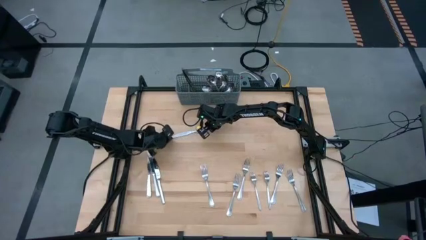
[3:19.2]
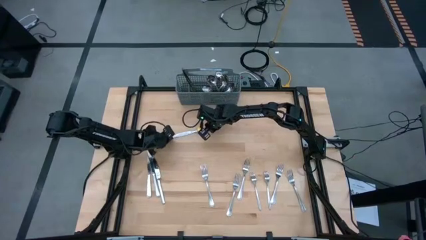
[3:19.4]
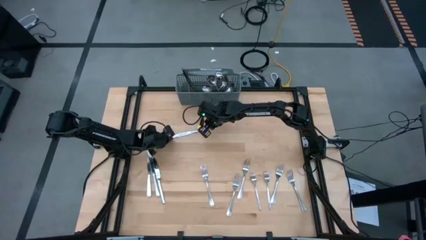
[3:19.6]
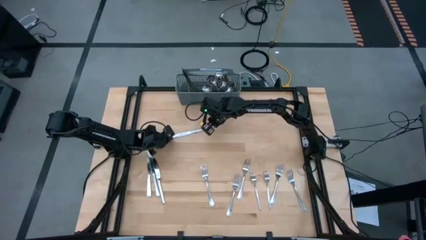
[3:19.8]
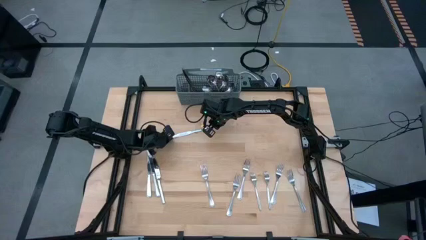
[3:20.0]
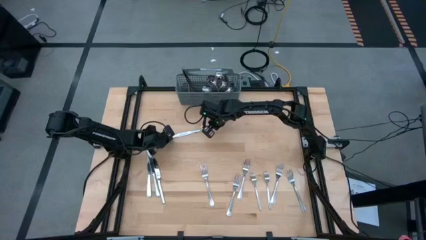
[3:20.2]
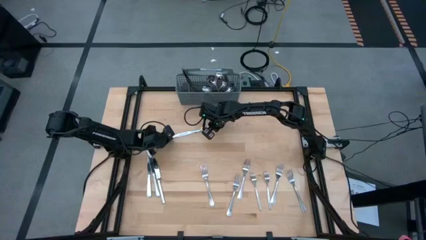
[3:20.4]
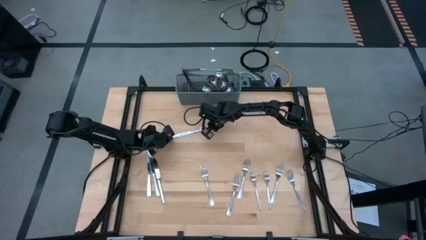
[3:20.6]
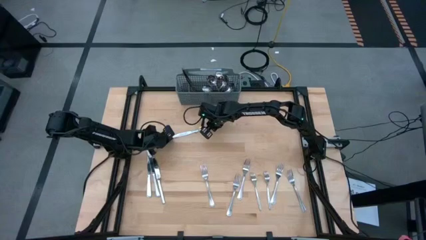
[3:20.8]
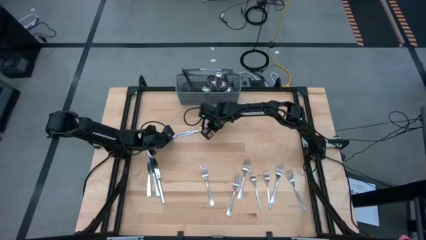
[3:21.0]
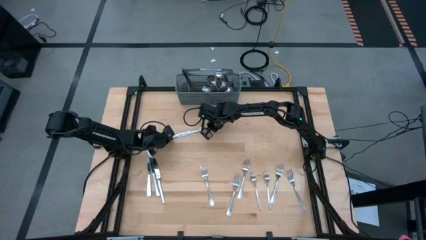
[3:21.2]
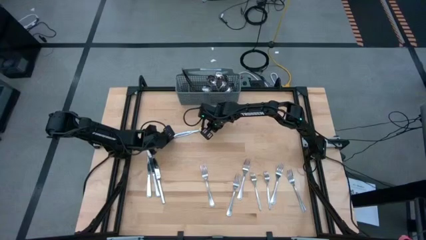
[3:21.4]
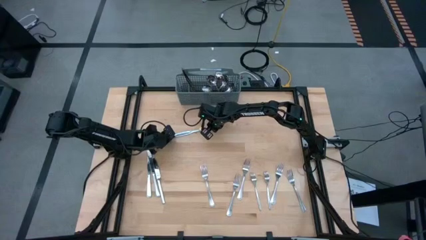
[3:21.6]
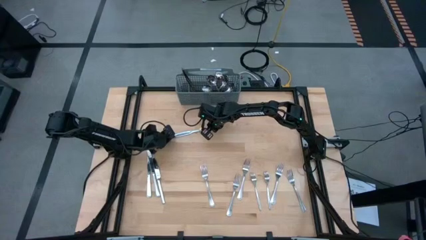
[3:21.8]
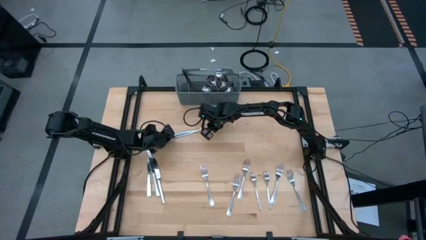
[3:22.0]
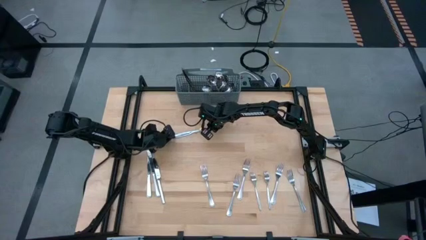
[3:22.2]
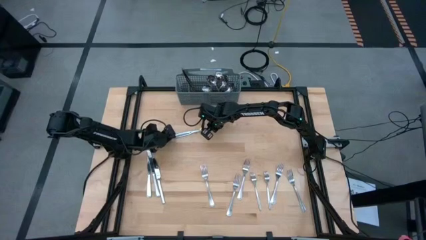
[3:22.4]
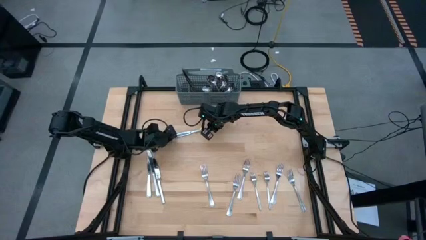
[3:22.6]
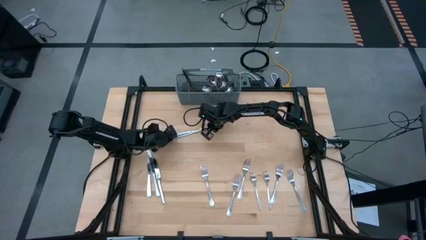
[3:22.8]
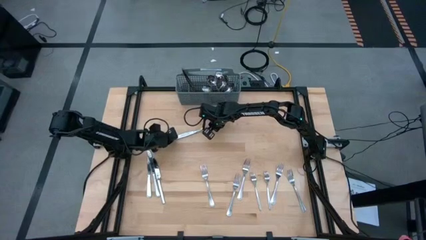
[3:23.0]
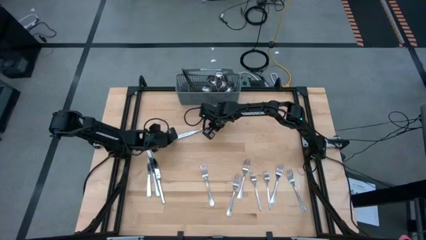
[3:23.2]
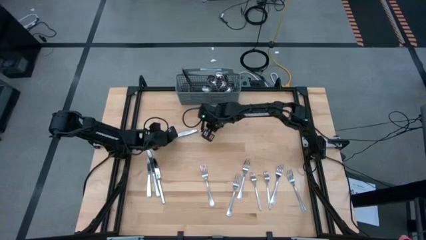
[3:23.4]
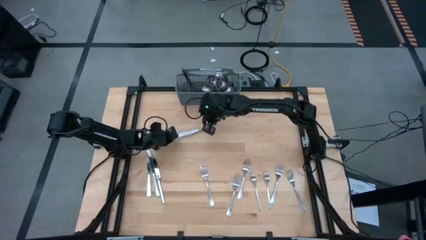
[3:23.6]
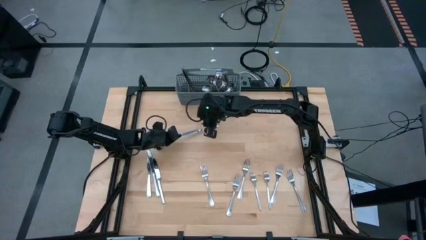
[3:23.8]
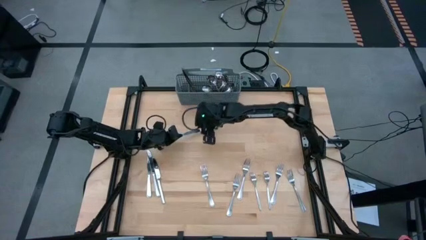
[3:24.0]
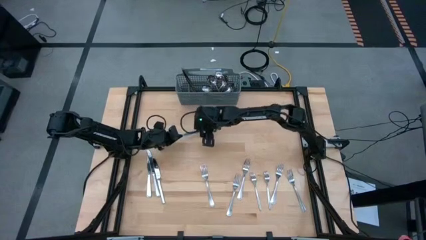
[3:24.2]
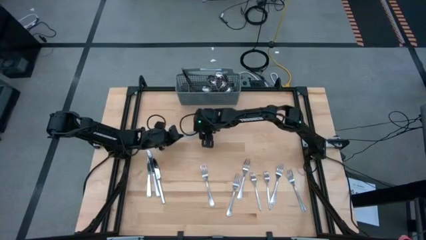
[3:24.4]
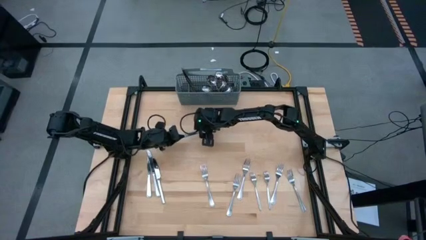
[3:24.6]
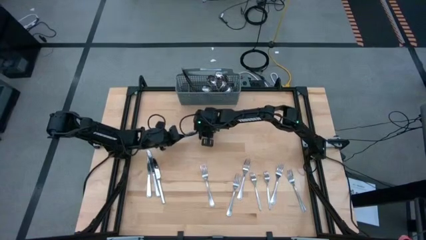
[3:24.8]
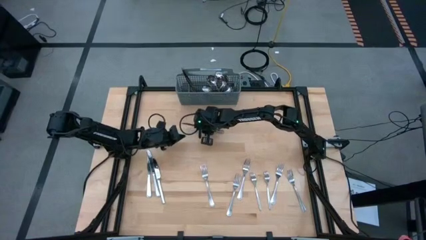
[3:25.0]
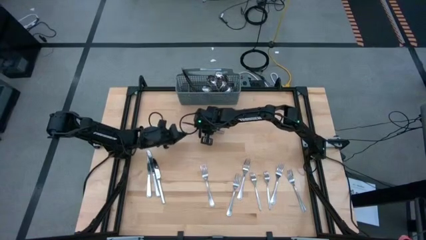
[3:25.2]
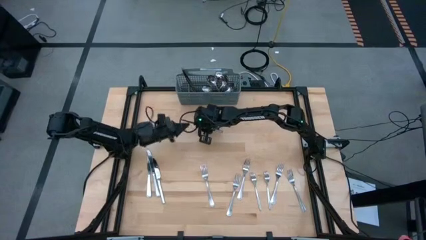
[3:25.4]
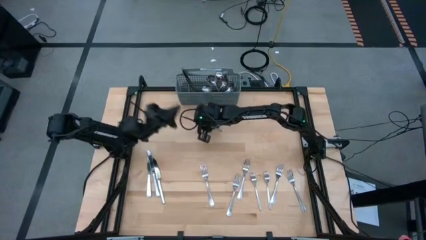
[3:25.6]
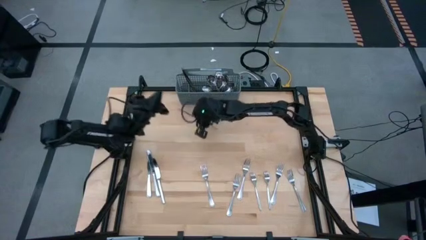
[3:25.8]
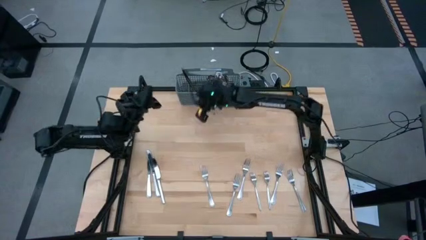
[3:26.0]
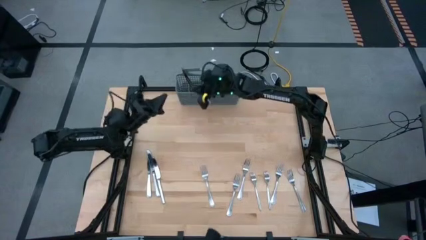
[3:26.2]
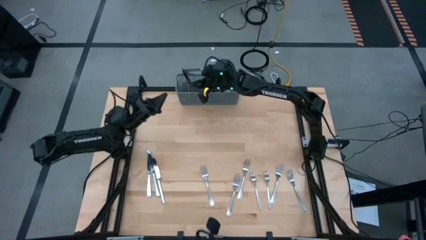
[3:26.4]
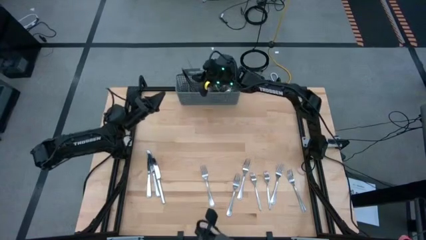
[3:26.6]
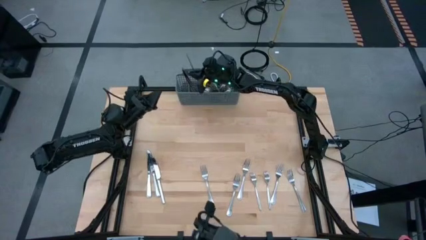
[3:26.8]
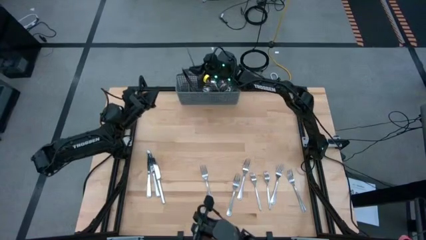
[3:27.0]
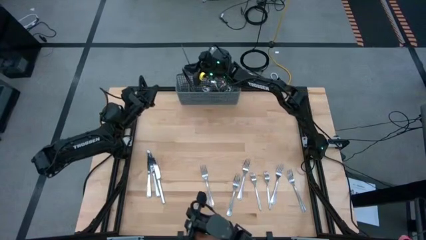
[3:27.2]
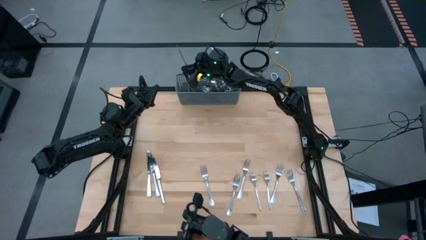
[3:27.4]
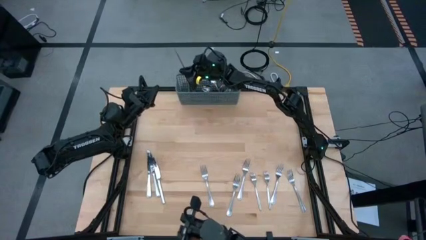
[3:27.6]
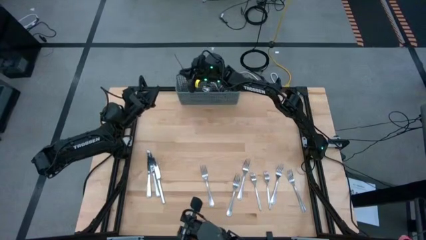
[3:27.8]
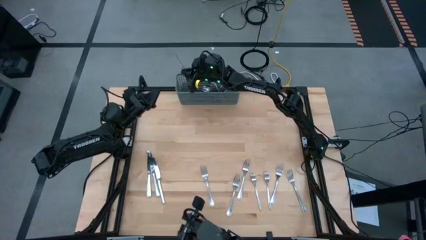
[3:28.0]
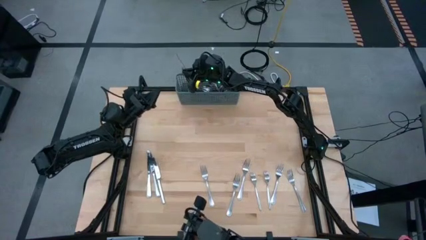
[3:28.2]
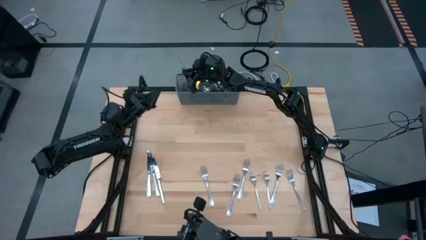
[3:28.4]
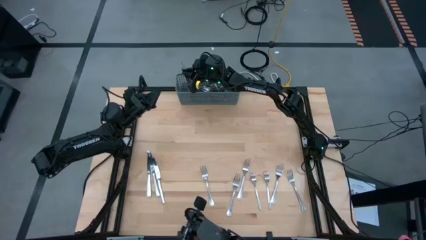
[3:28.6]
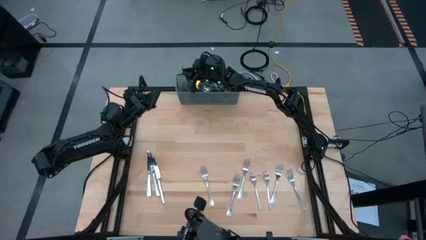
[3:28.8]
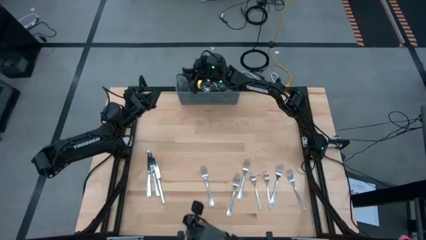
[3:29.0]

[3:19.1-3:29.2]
Task: Sort silverware
Put the silver knife into the gray utensil holder

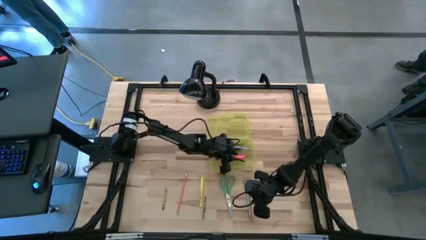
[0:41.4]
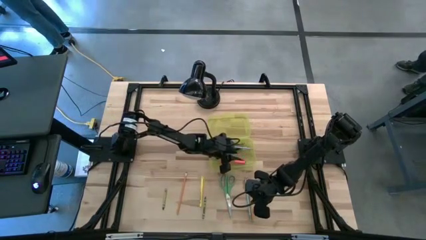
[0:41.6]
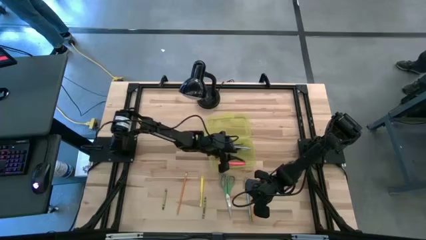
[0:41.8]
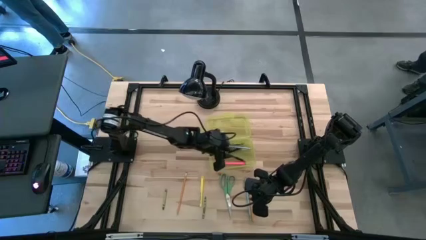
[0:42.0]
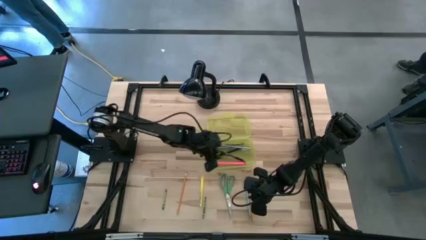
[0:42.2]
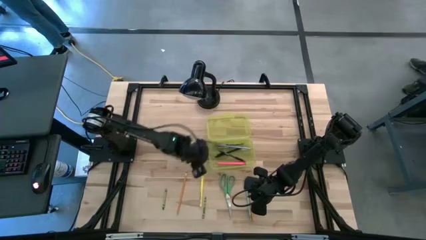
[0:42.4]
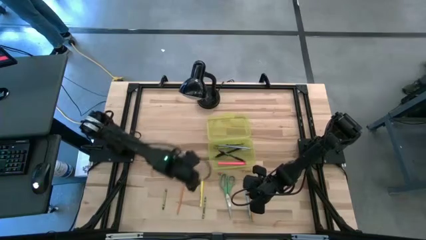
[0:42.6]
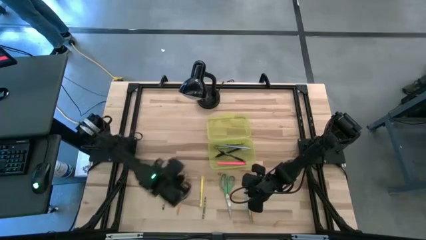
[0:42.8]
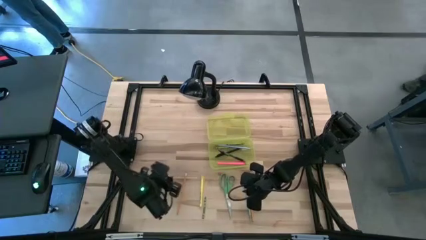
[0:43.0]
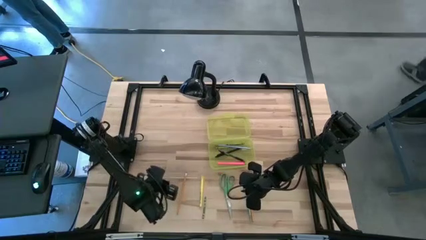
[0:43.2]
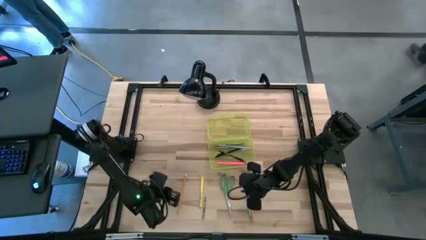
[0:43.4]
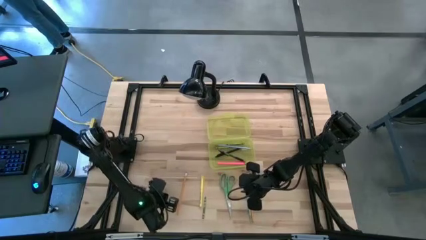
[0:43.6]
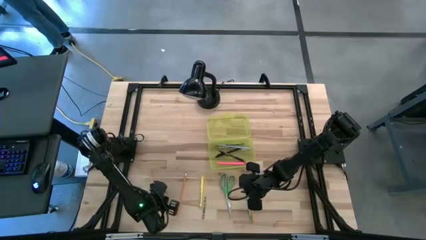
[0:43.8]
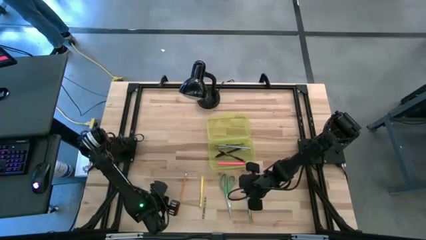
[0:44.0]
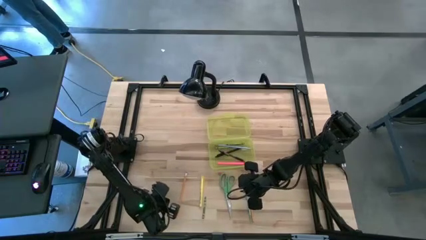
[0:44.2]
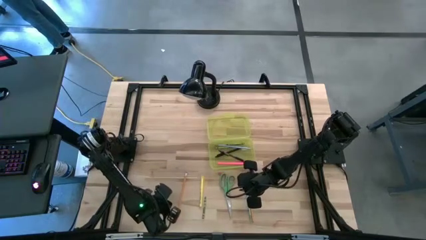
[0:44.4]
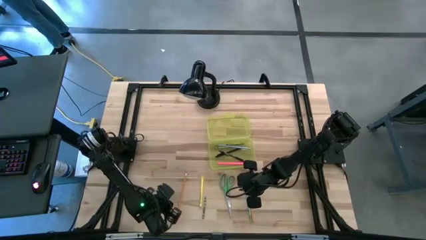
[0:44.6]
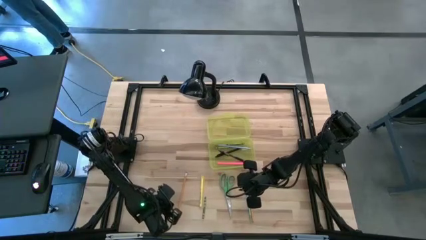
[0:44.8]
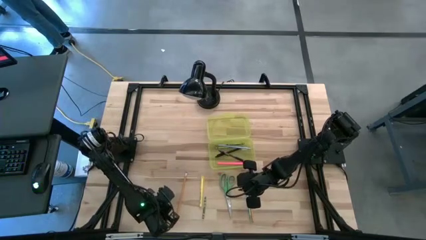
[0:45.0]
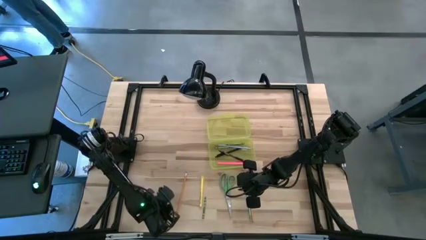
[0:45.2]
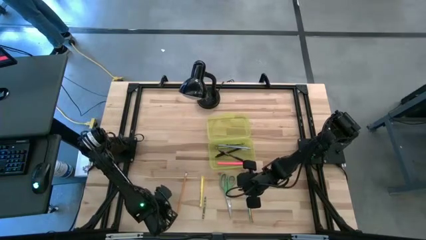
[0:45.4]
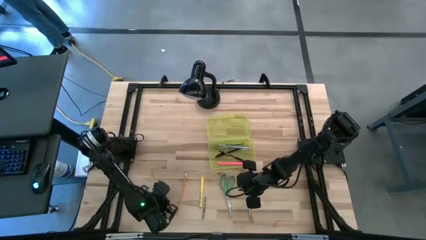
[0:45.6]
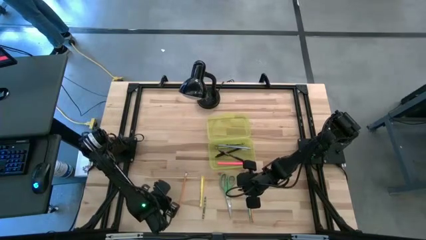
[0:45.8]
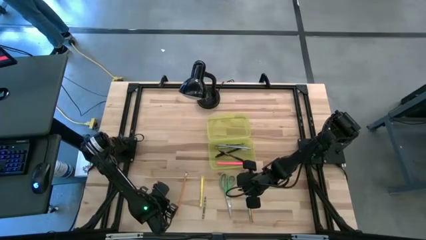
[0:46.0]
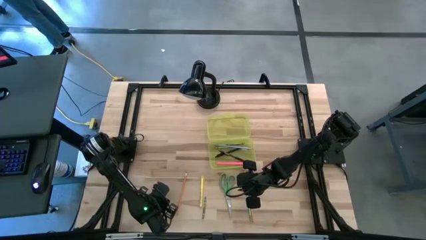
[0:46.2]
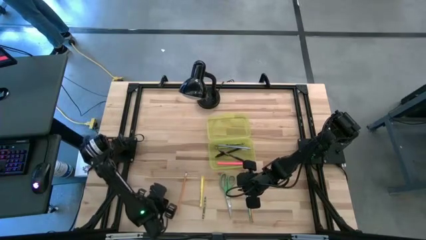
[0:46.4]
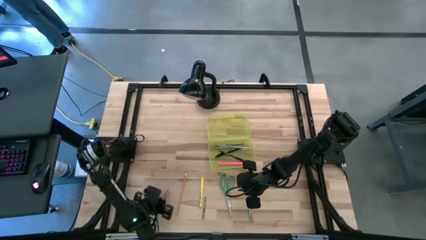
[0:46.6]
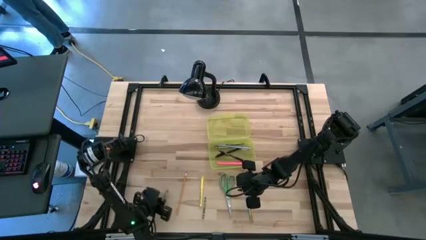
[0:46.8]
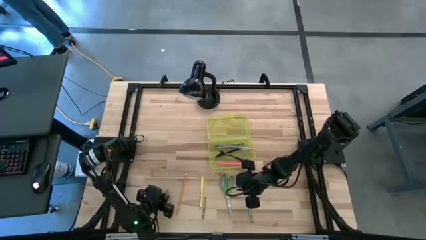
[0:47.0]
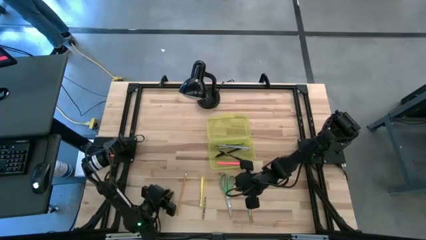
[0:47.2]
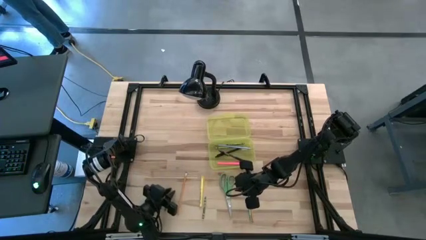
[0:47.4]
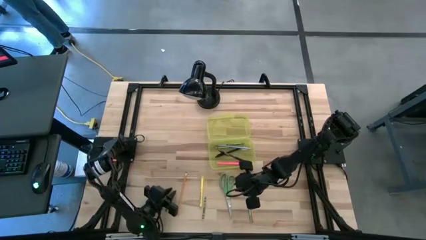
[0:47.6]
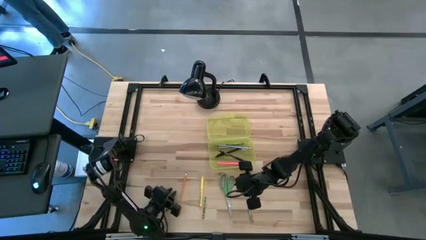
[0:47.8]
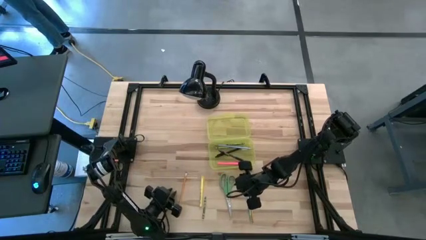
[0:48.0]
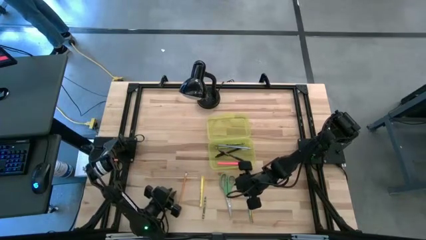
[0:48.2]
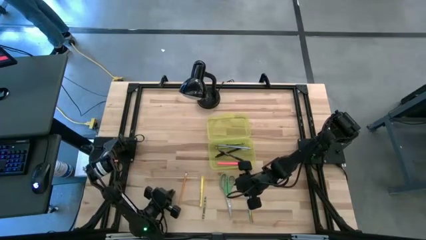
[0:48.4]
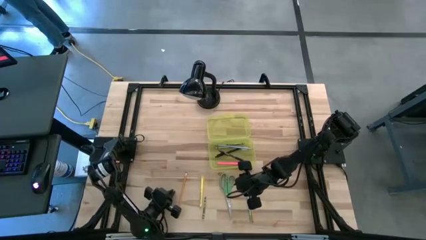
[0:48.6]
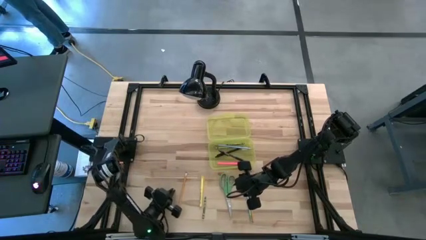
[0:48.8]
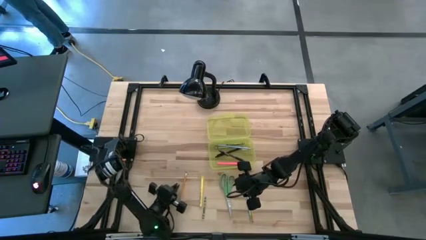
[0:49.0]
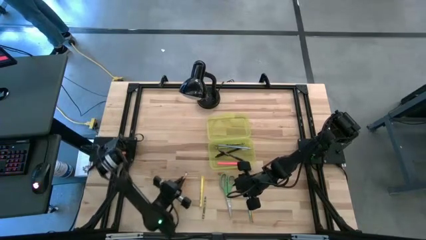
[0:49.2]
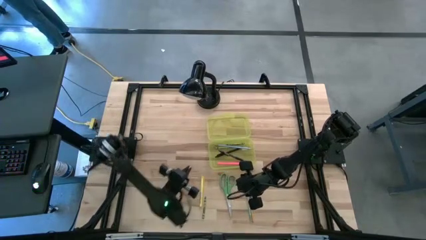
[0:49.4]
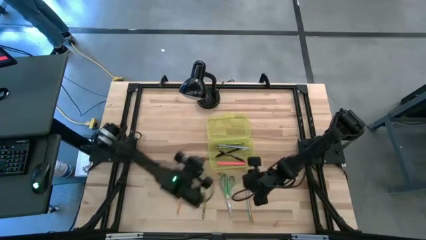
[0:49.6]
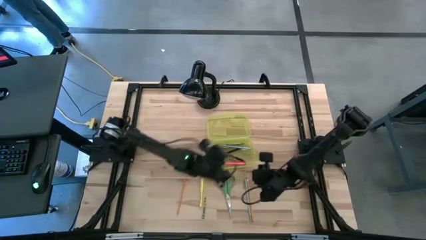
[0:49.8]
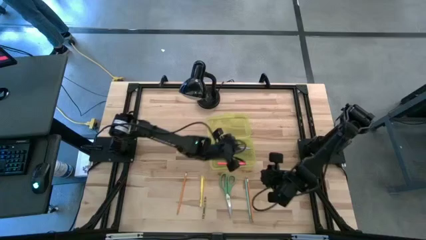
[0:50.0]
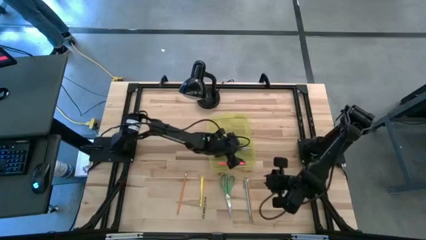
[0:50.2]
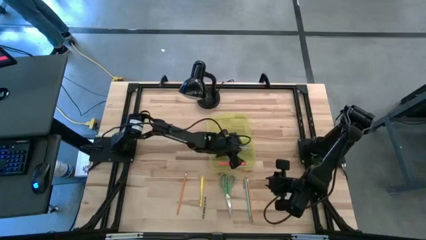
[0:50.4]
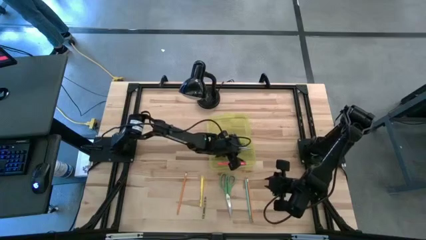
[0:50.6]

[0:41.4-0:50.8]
Task: Pick & place school supplies into a supply box
Put the left green crayon into the yellow supply box
